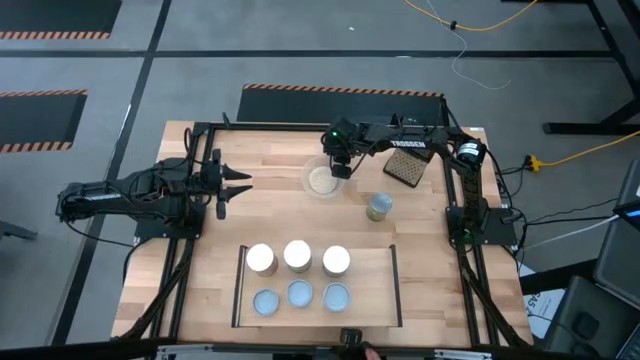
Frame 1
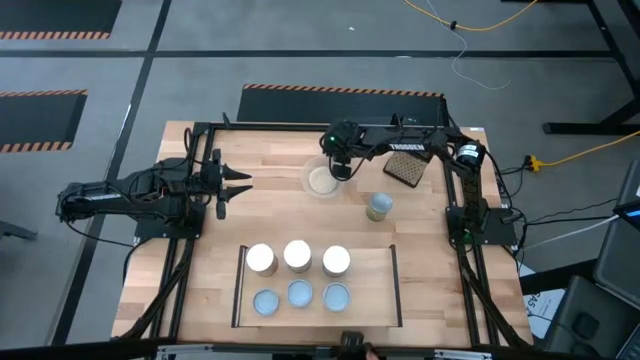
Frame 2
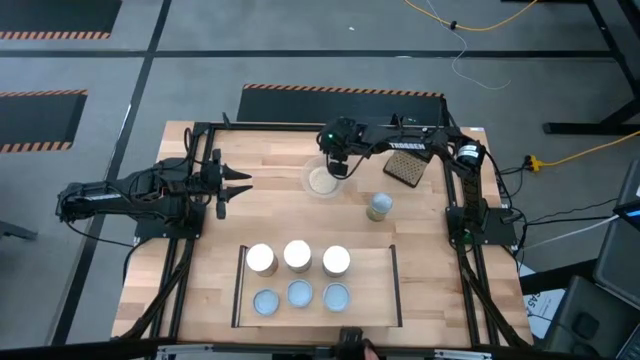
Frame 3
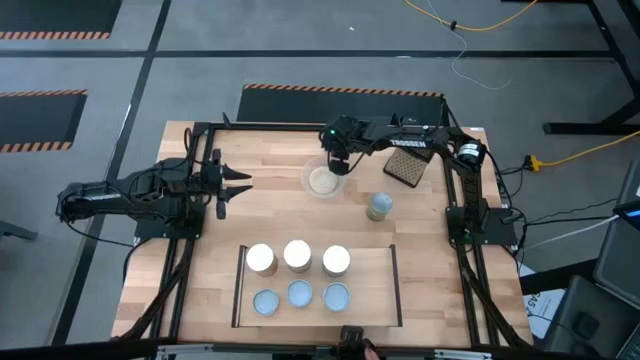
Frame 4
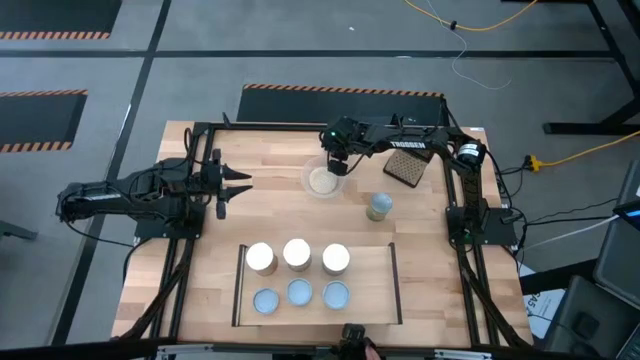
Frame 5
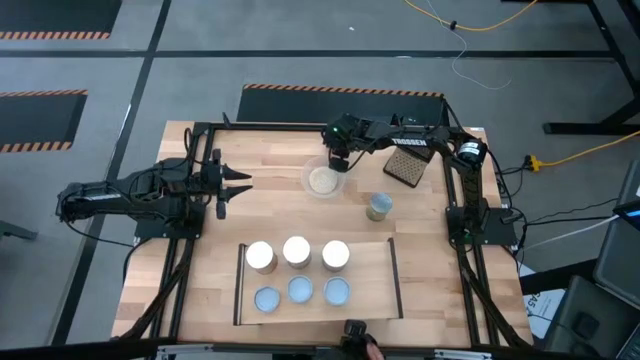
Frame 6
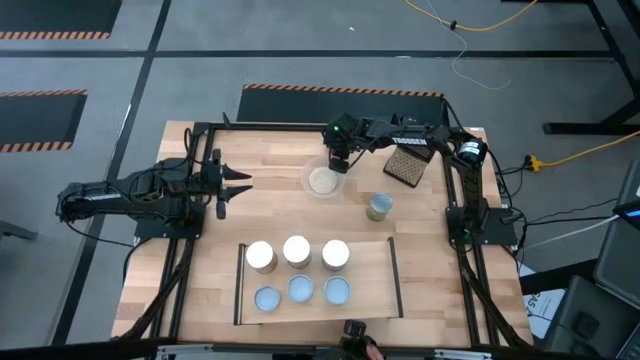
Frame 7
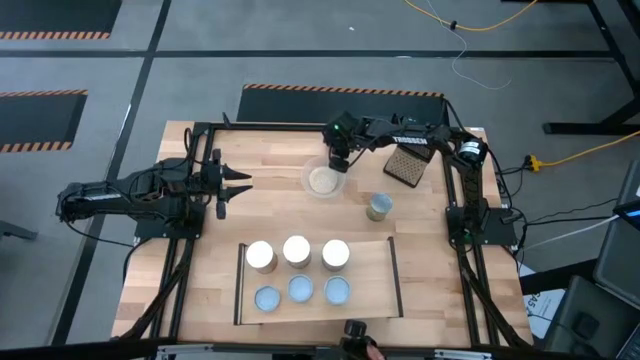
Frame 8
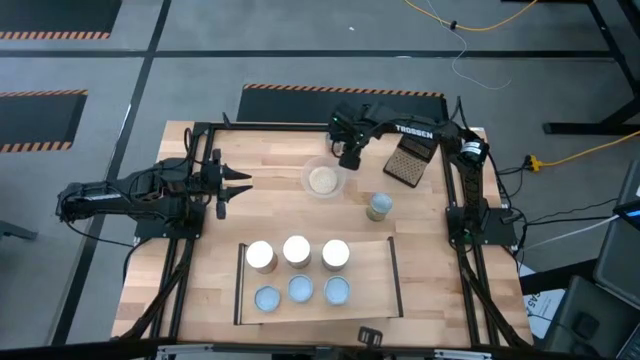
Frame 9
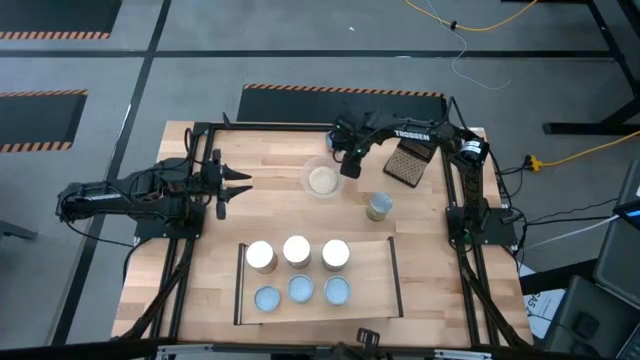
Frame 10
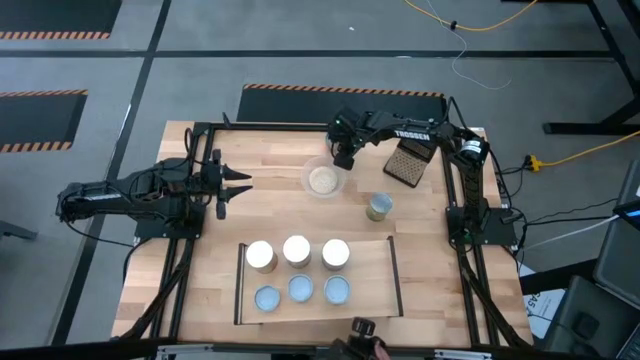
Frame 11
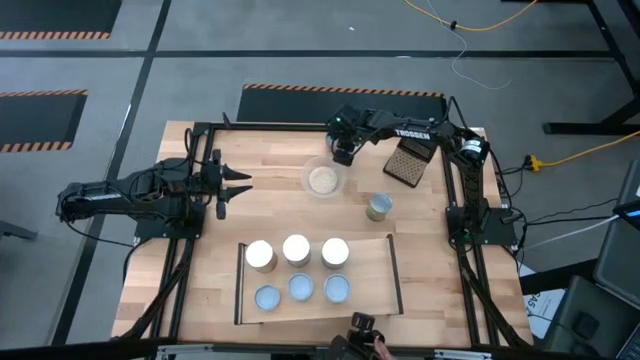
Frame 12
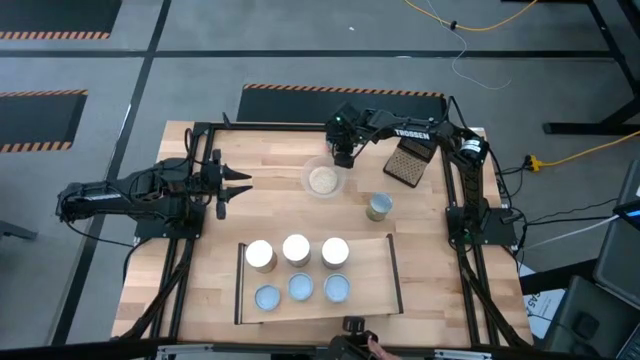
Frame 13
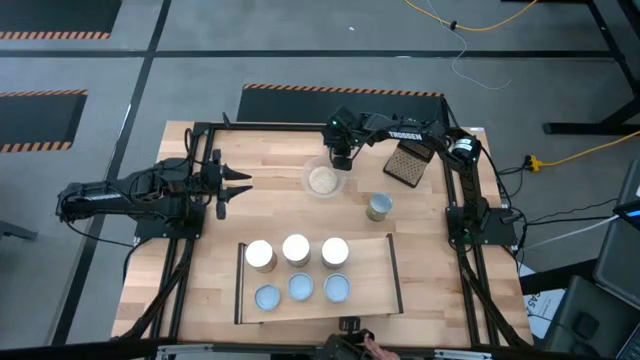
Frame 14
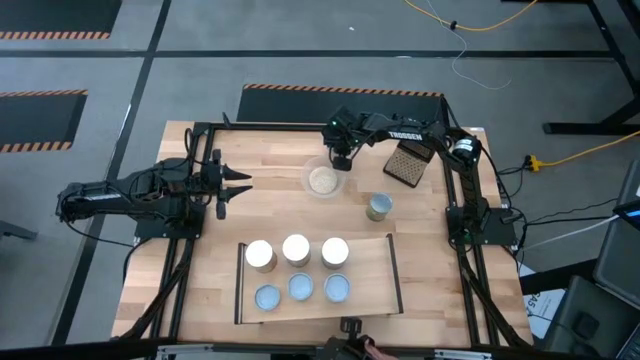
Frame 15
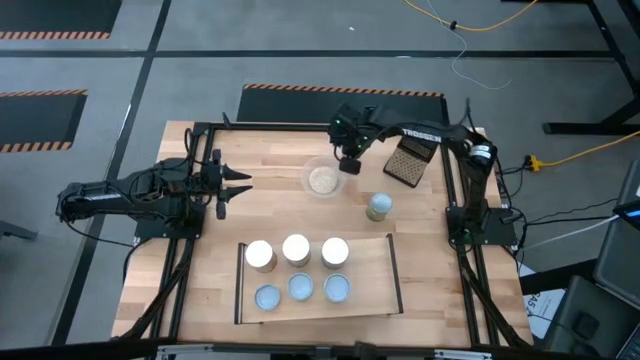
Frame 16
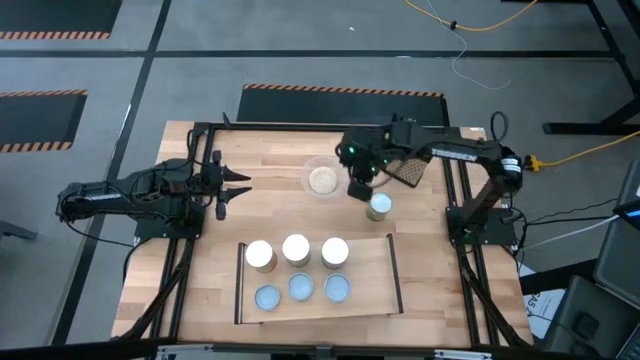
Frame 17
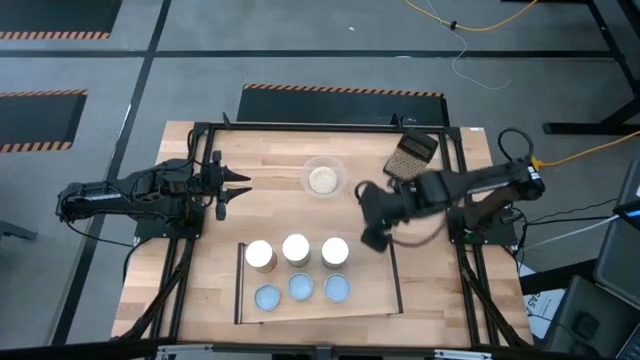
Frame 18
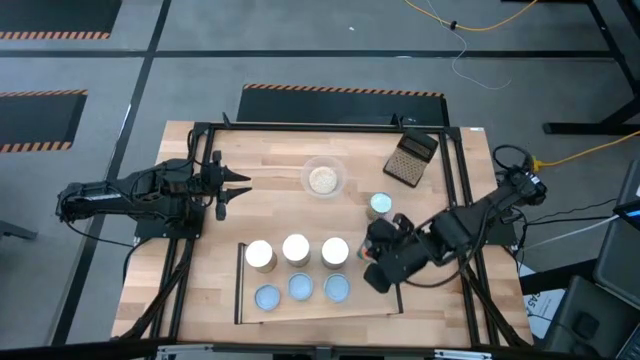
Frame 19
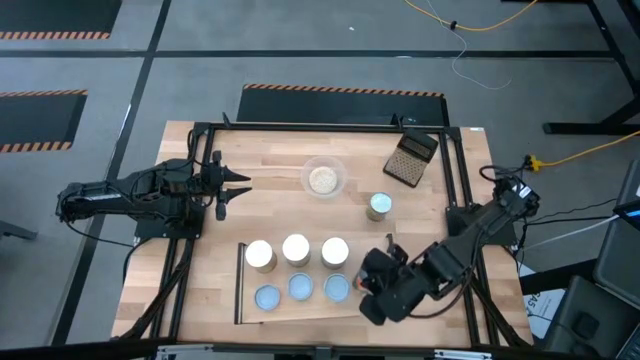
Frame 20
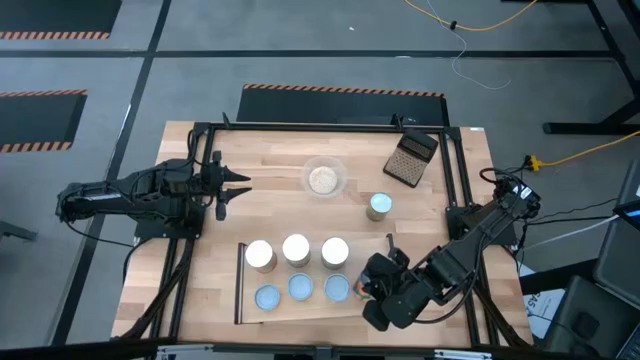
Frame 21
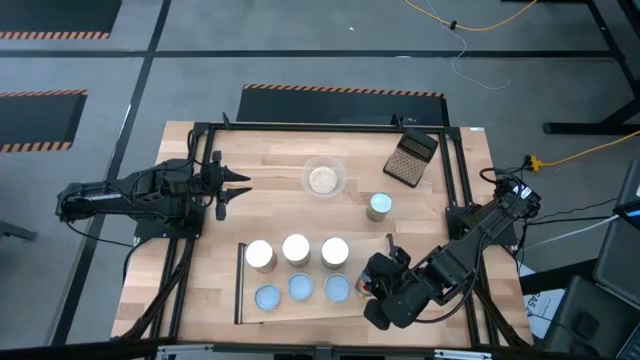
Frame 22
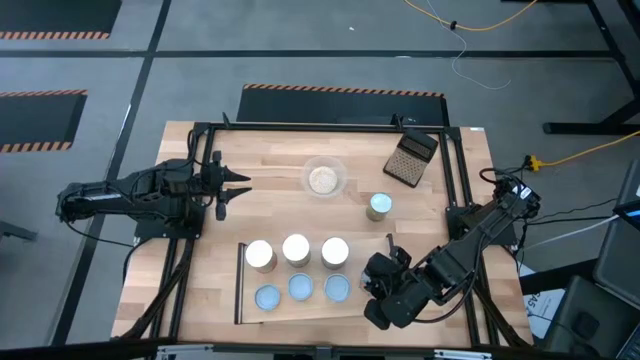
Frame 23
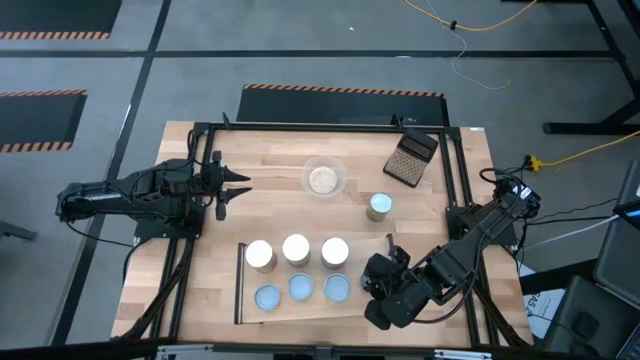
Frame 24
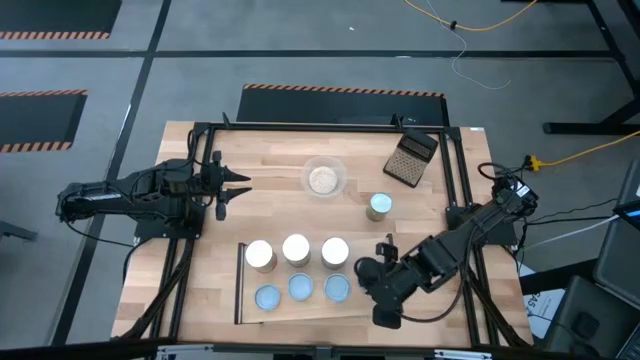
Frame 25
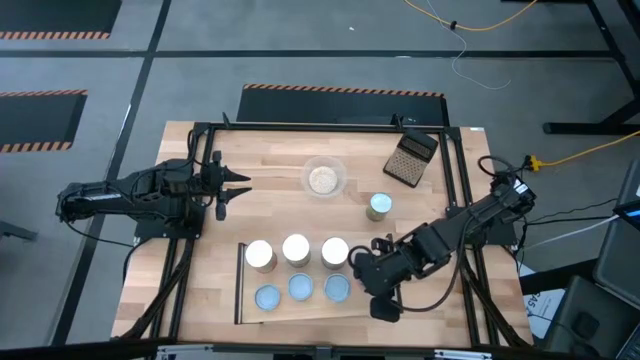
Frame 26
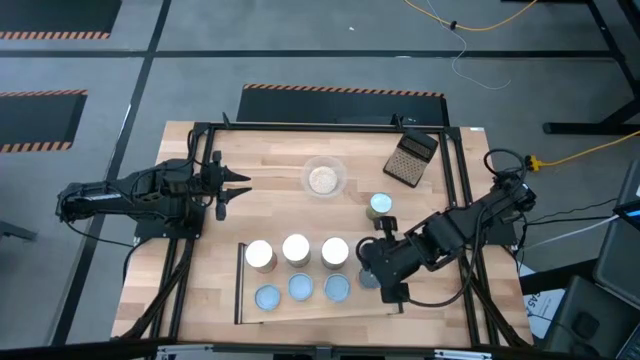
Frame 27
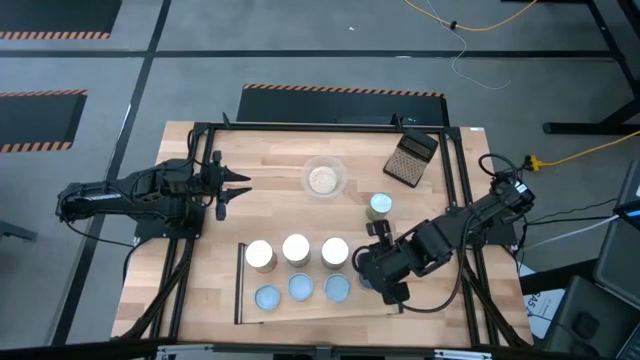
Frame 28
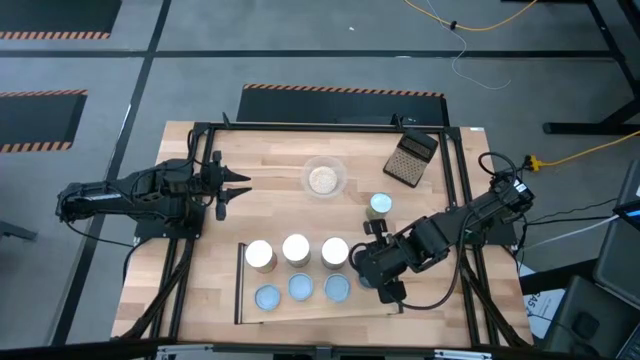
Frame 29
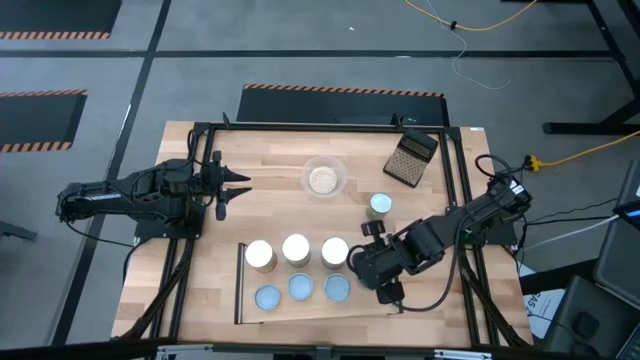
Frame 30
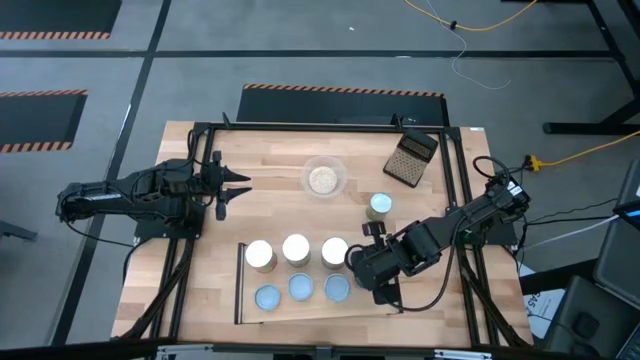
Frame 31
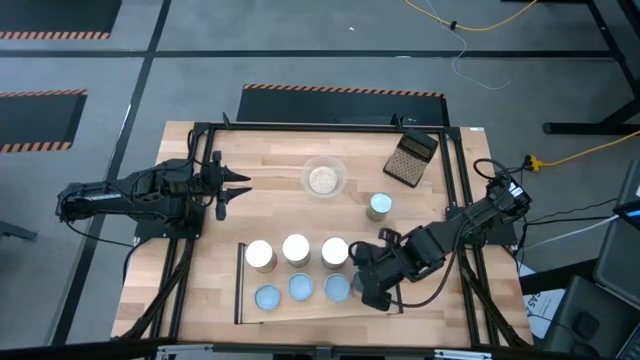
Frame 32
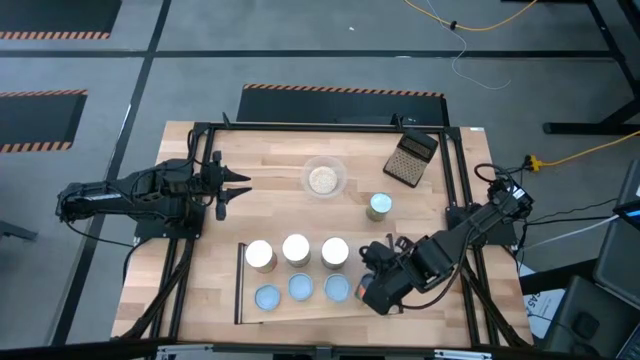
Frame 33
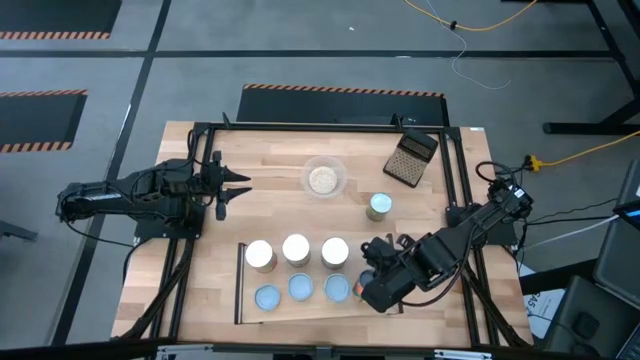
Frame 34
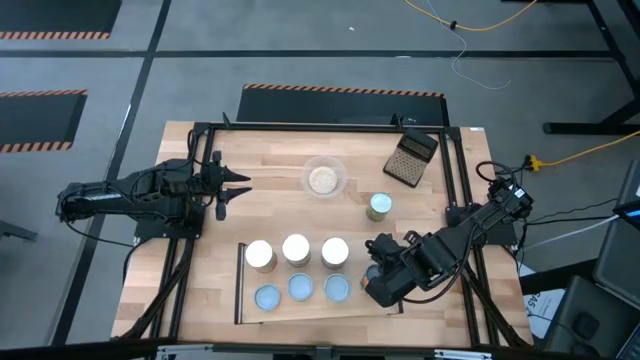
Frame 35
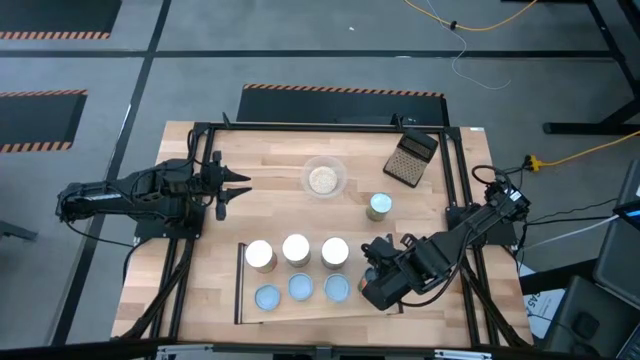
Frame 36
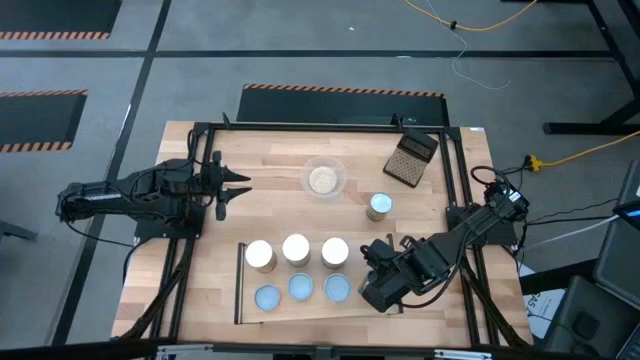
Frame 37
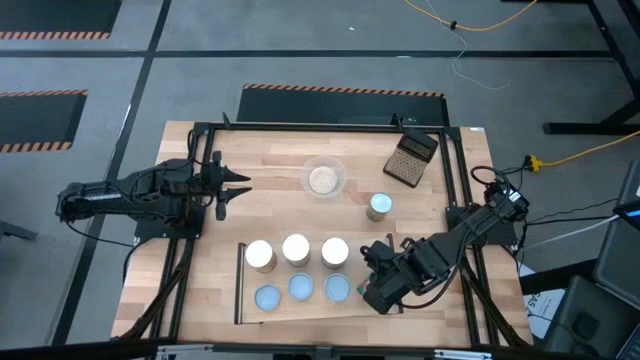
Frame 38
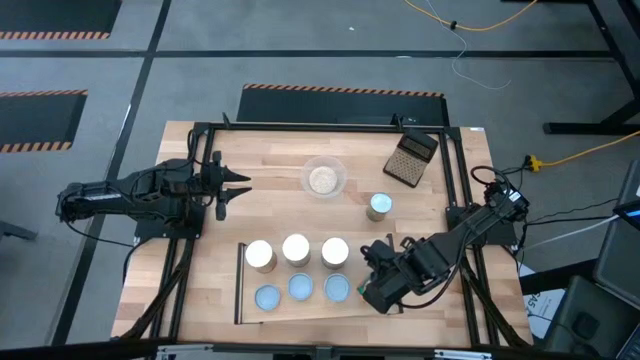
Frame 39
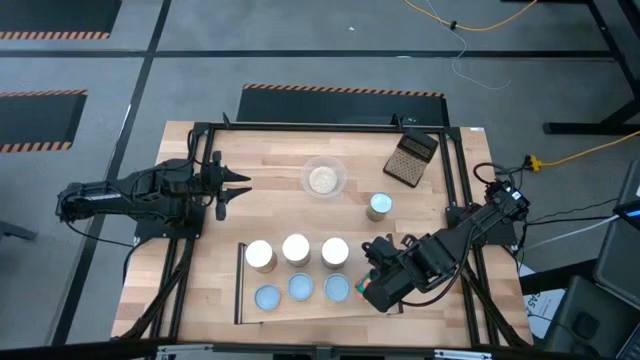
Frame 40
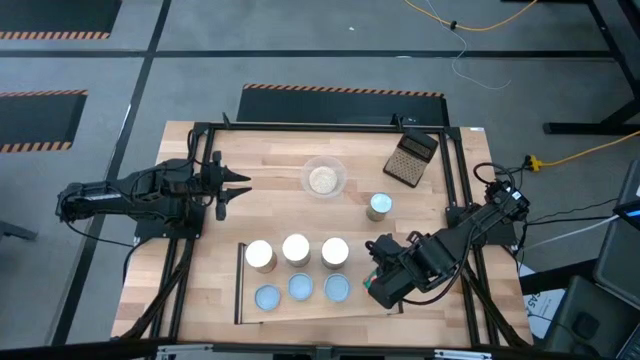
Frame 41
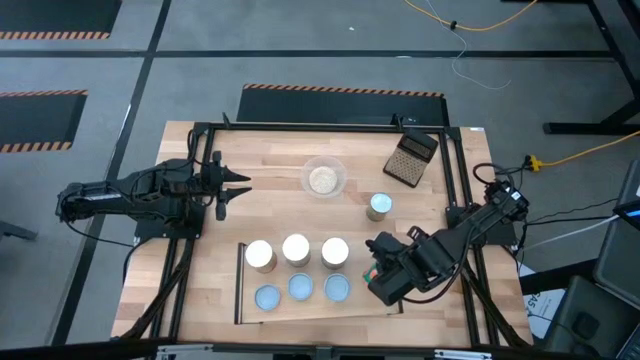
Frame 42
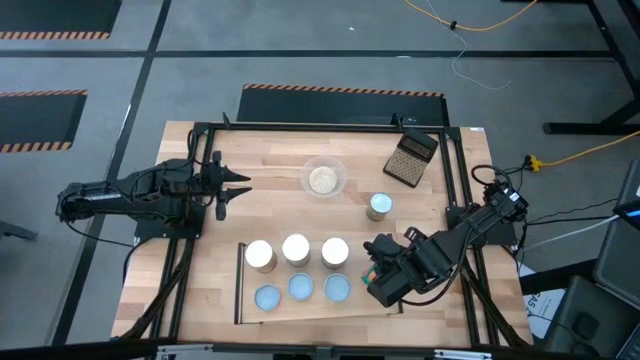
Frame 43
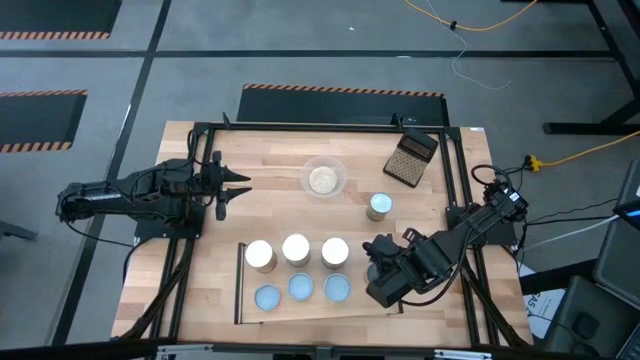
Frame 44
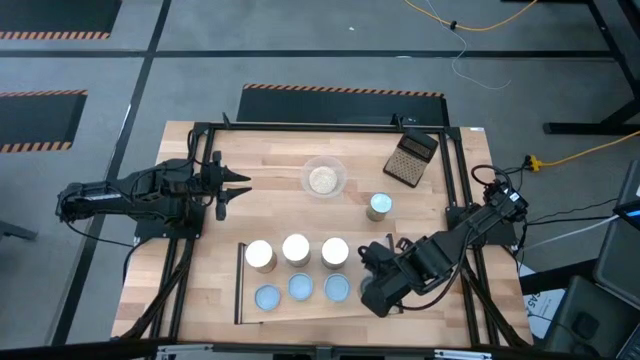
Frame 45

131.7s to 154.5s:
Task: Pick and place cans onto a shelf
Put the small canned oranges on the shelf
